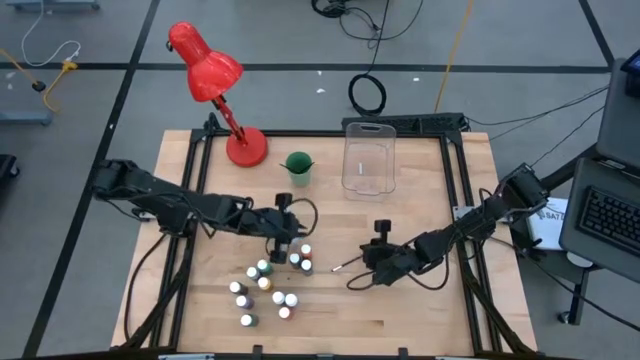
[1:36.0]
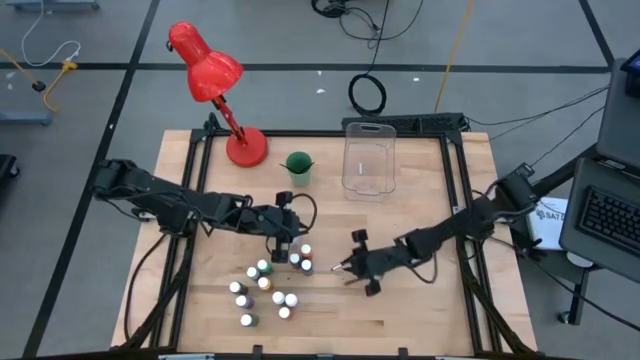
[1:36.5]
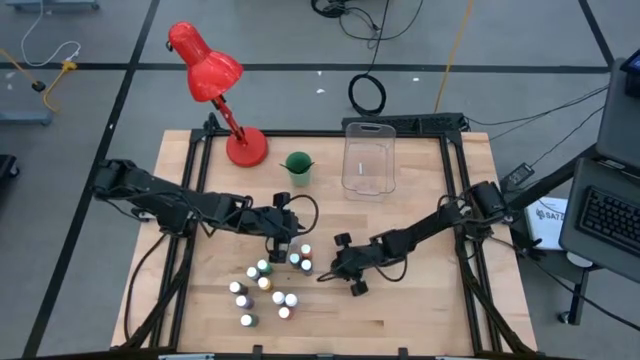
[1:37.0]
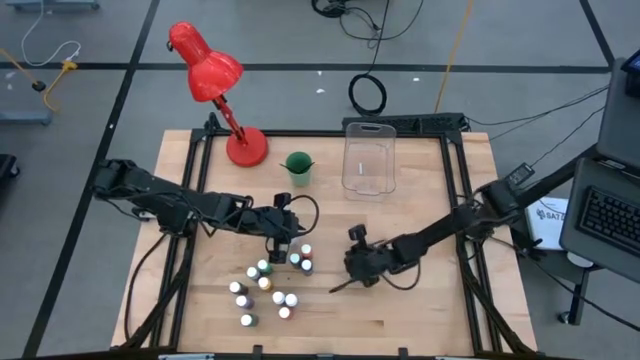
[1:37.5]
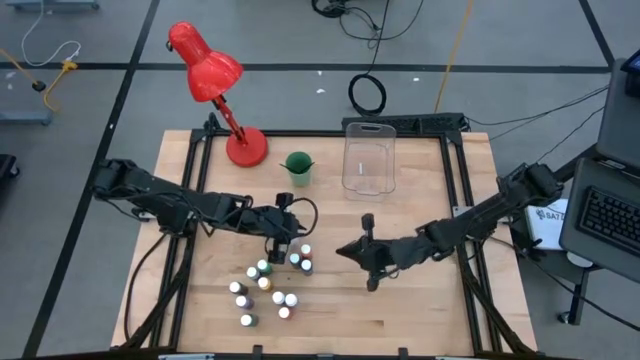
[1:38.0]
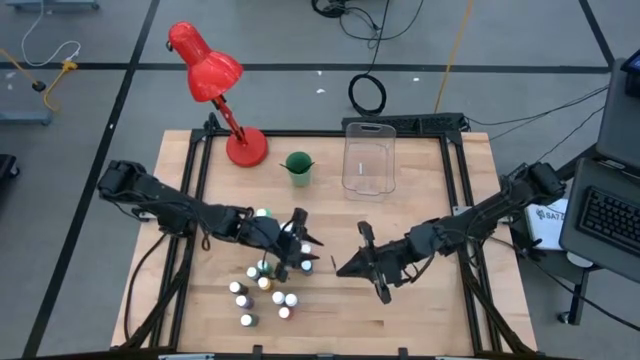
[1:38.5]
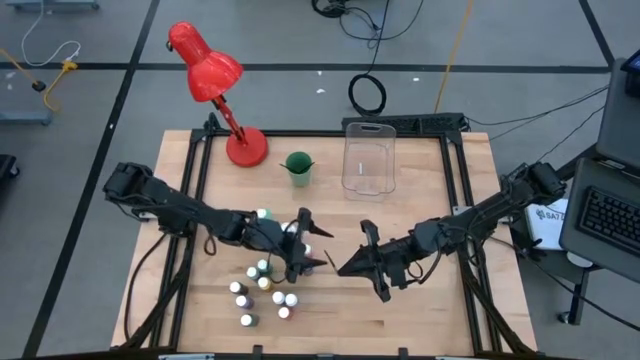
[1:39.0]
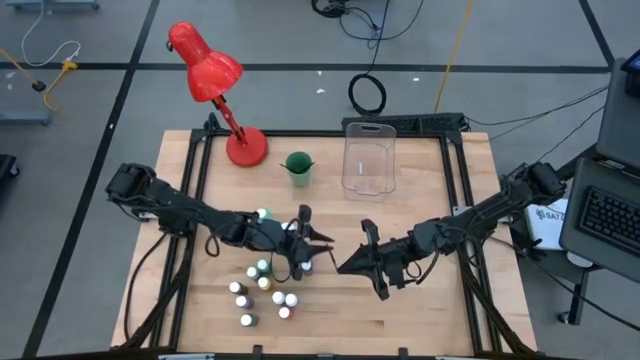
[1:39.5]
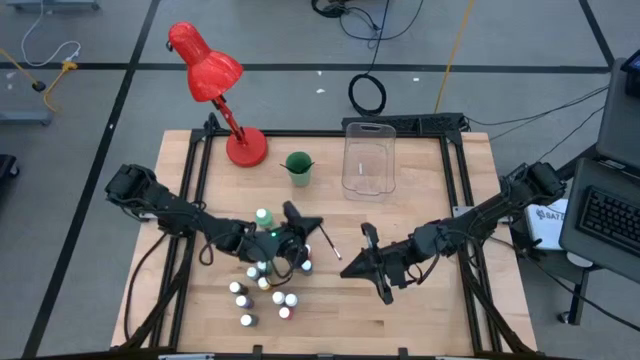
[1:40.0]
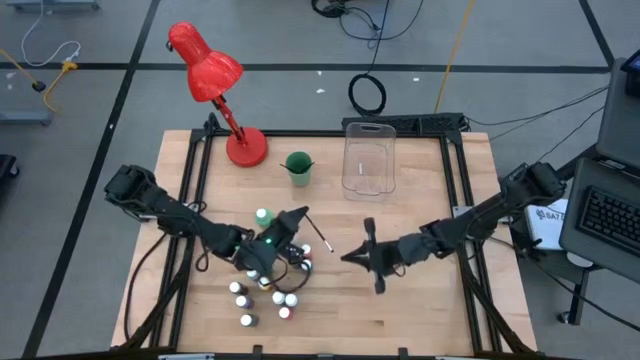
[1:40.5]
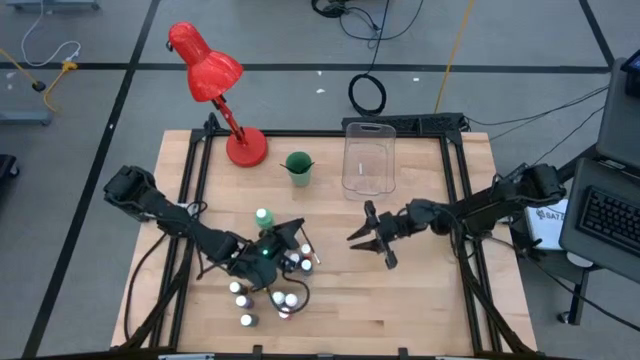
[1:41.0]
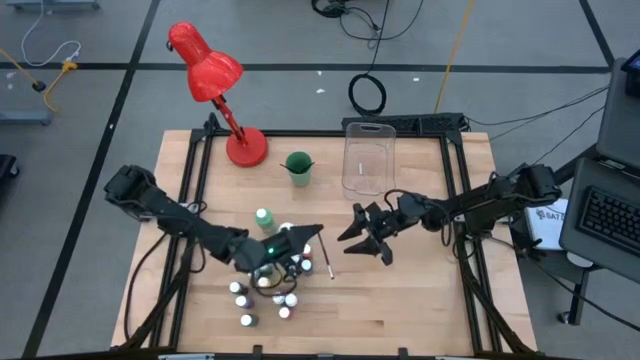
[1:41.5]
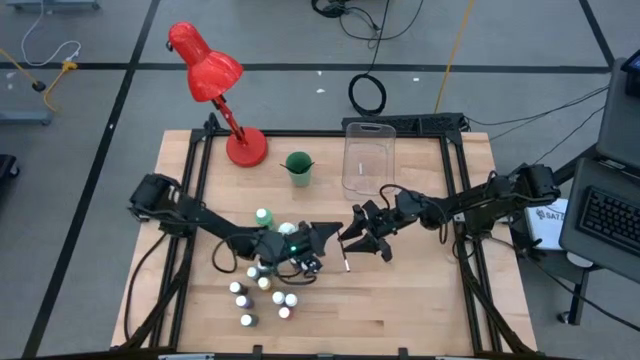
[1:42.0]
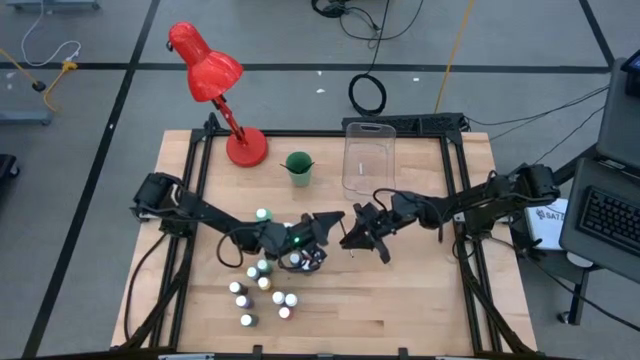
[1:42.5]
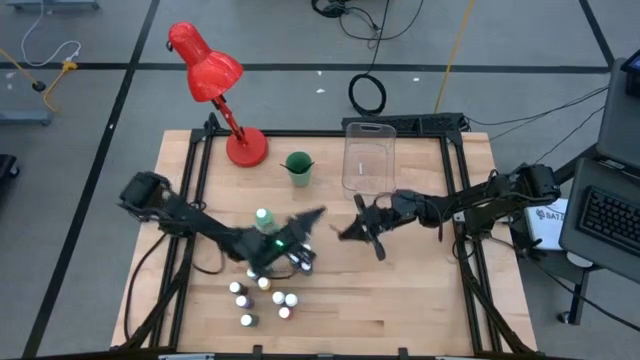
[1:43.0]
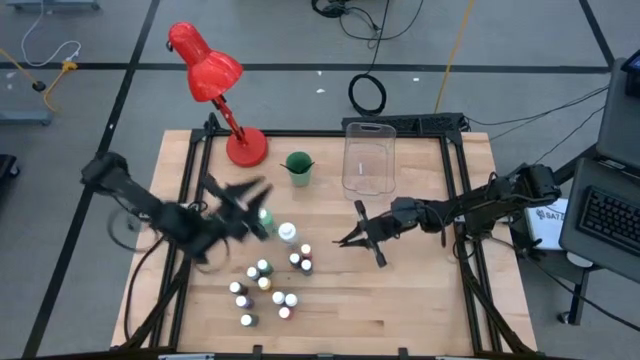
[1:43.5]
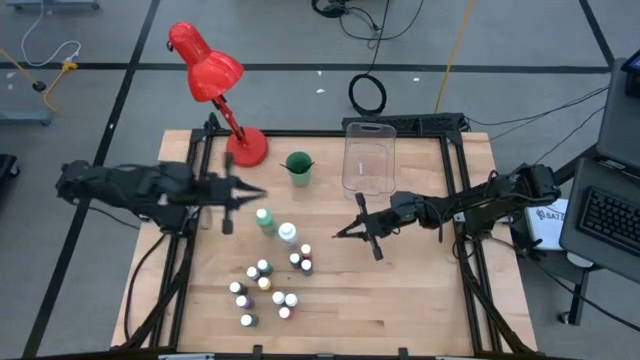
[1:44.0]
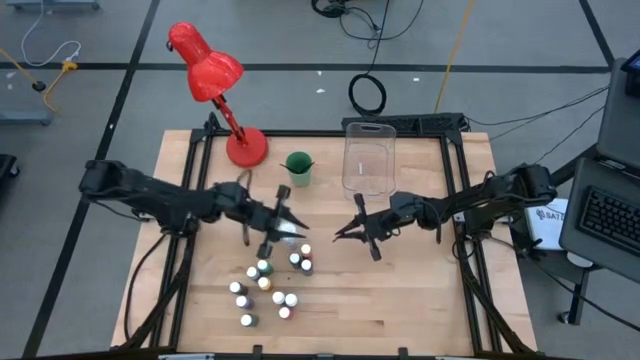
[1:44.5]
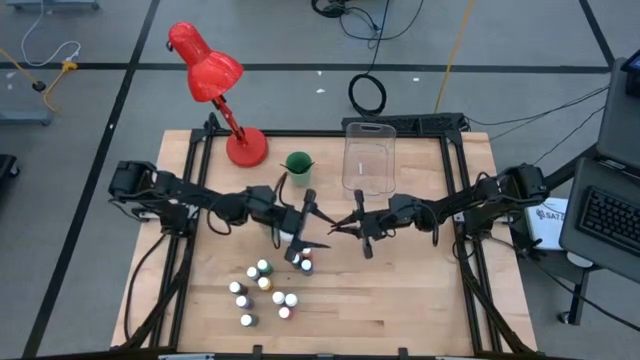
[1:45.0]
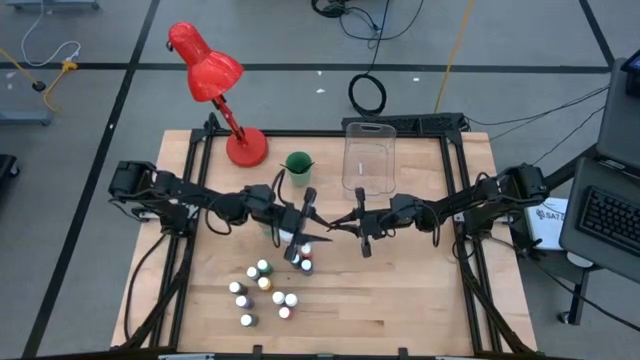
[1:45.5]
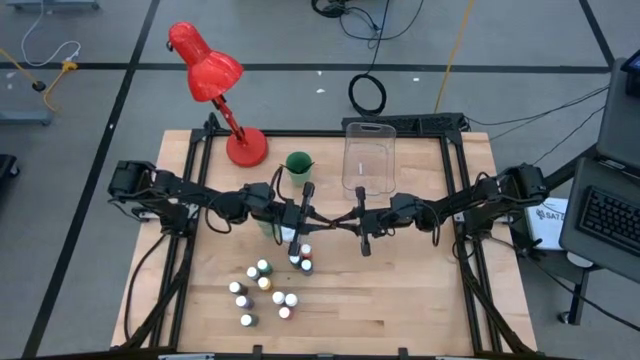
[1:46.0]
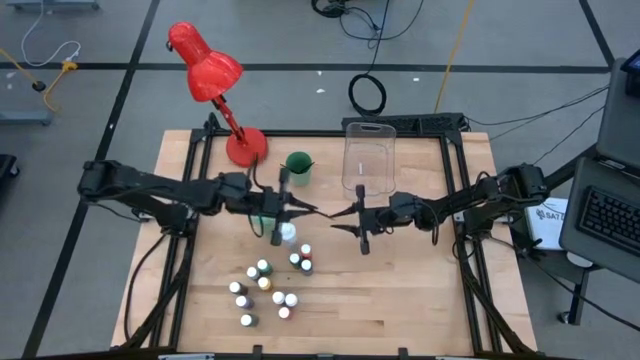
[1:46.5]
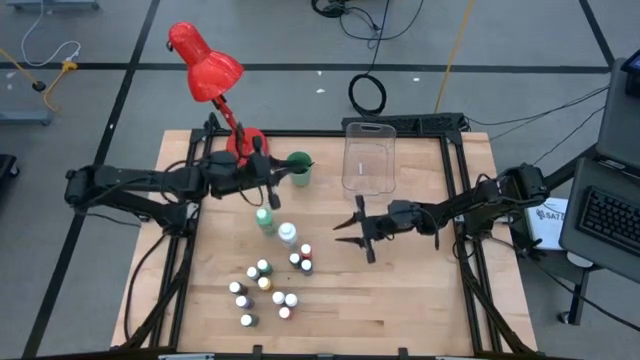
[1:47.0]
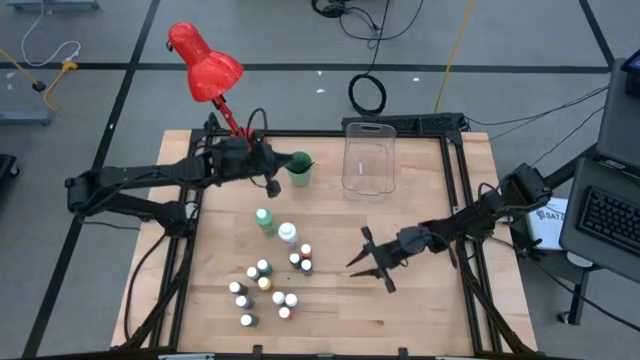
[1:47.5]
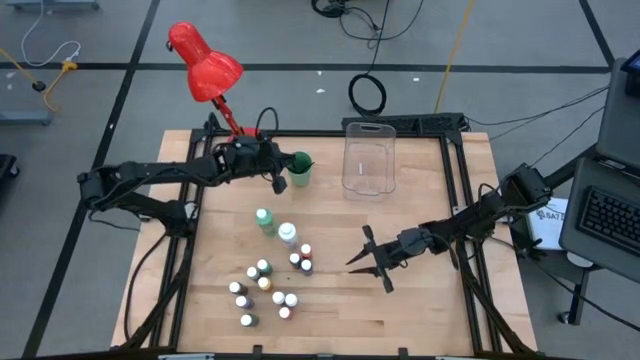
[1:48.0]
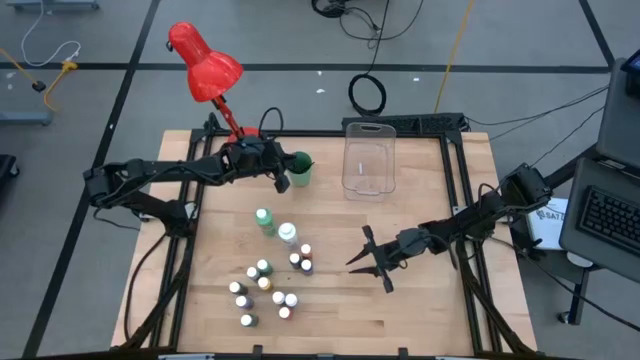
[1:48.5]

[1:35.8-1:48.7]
Task: Pick & Place Paint Supplies
Put the silver paintbrush into the green cup

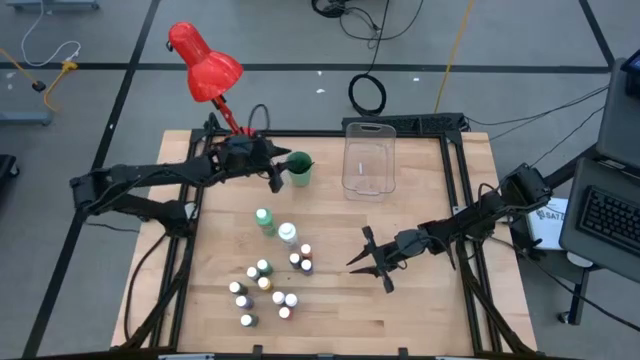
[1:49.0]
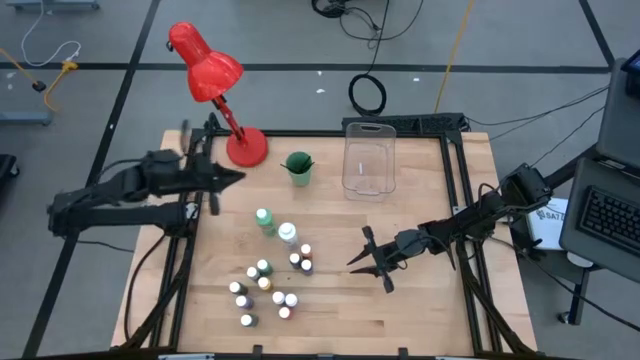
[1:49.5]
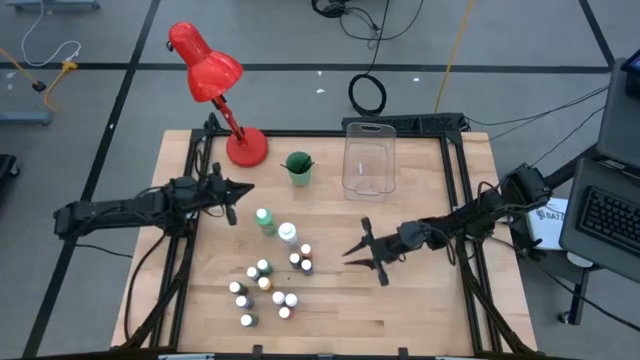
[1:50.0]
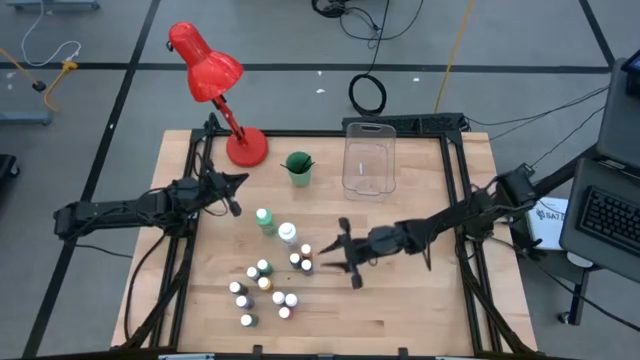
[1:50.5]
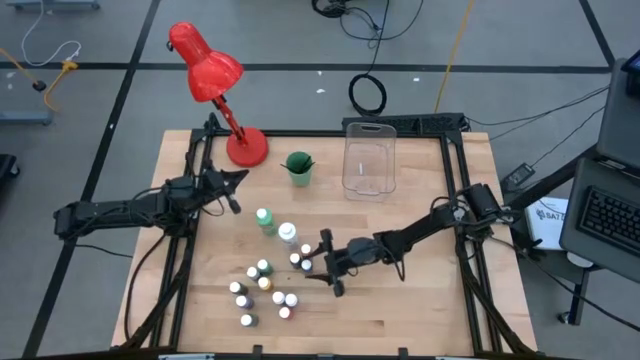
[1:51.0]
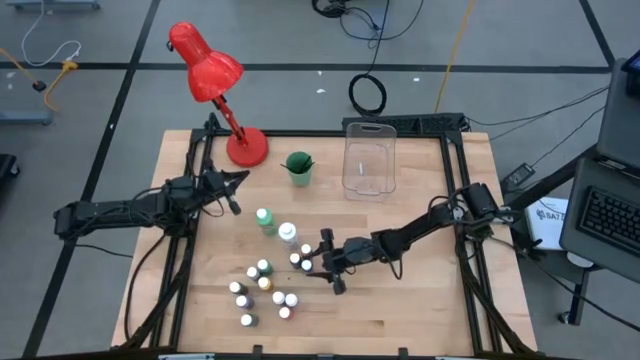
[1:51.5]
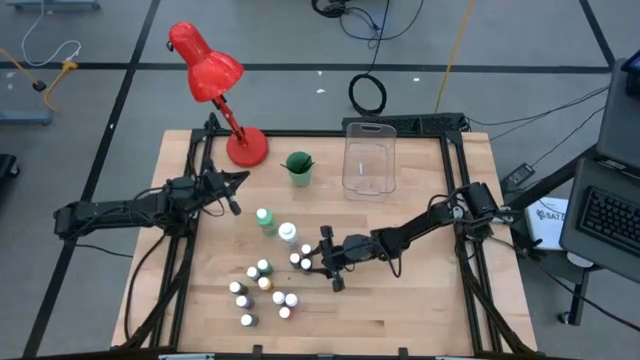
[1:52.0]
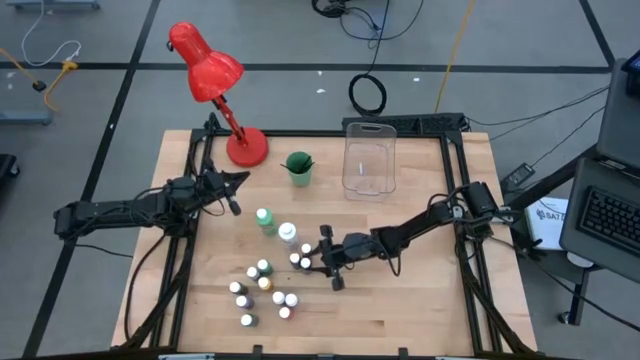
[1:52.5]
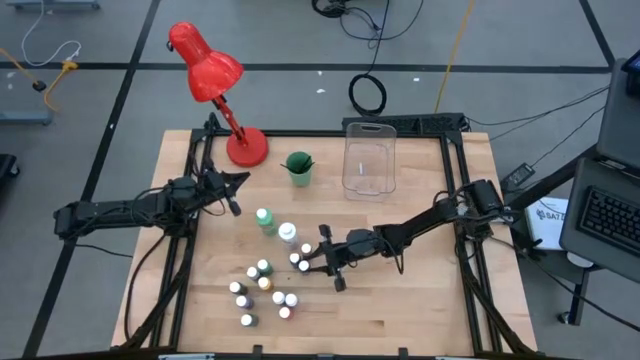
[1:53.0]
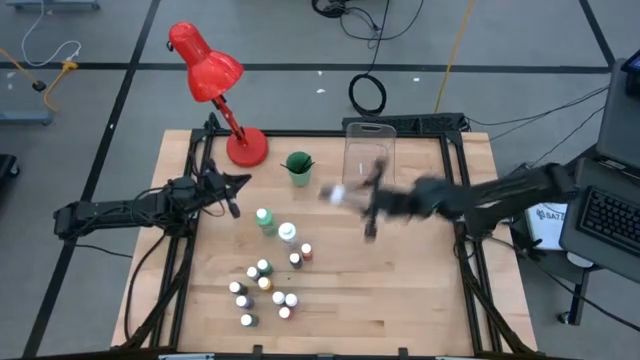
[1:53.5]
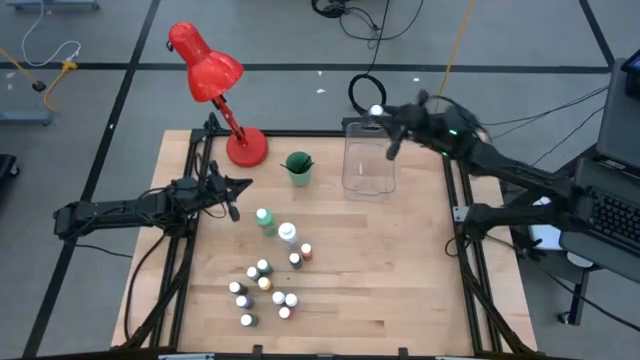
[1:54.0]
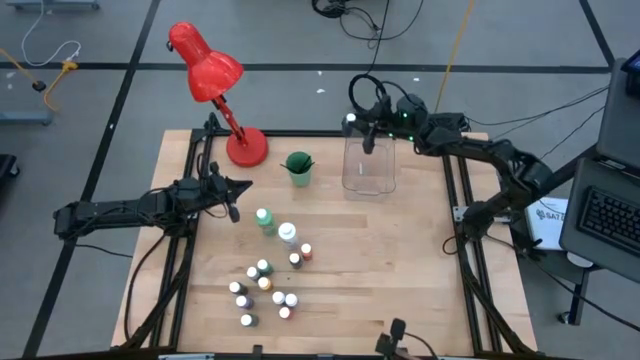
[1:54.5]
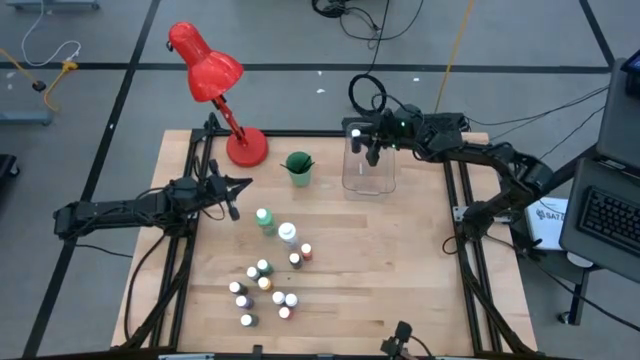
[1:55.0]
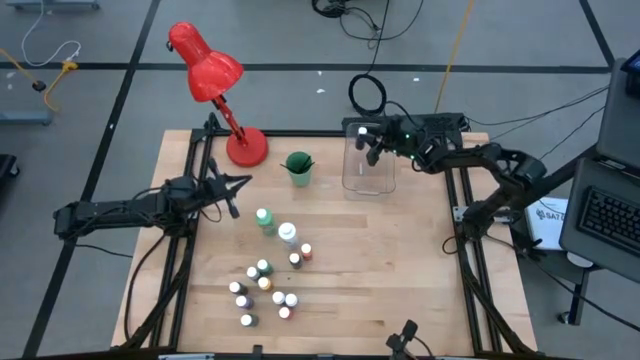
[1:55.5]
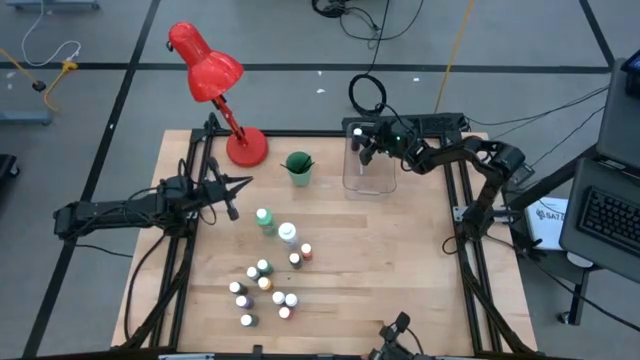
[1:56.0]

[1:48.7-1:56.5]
Put the blue paint bottle into the transparent bin

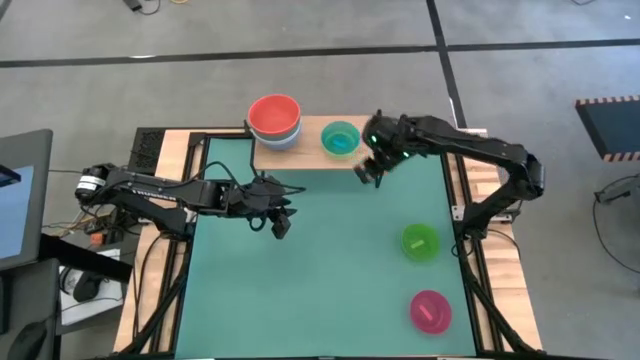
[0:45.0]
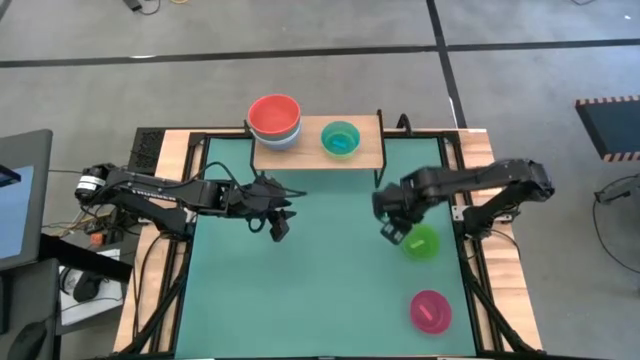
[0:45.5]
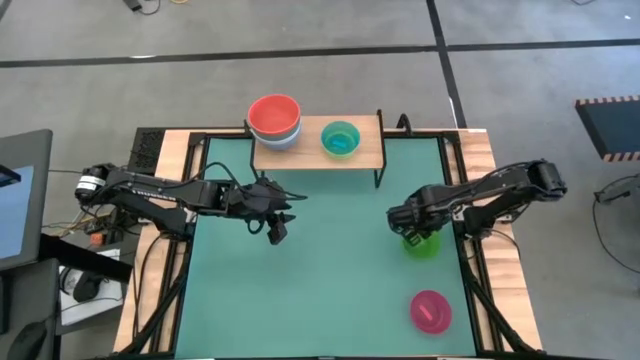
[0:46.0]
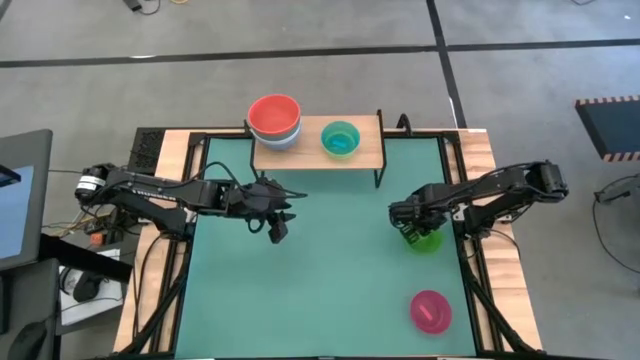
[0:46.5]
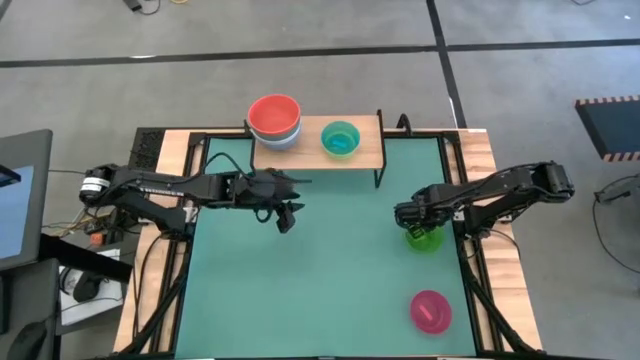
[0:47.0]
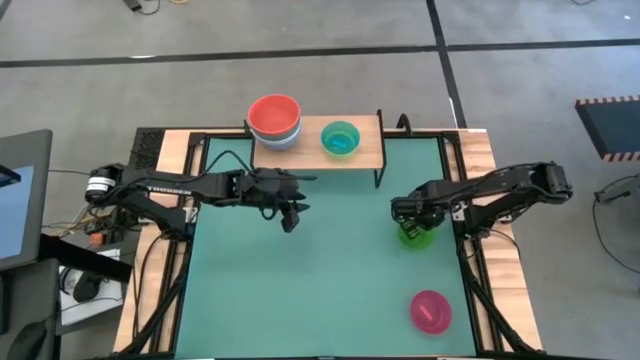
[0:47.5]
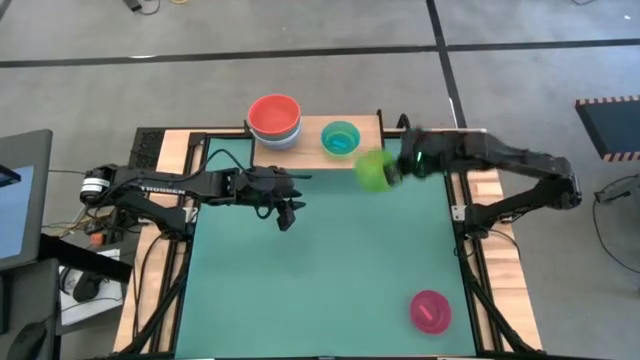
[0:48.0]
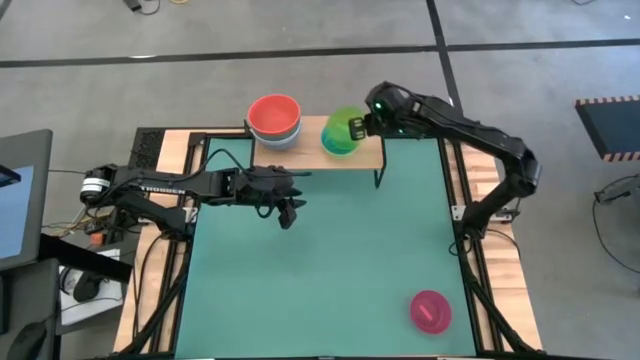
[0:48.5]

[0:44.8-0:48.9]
Task: Place and stack bowls onto a shelf
Stack the light green bowl on top the light blue bowl on the shelf
